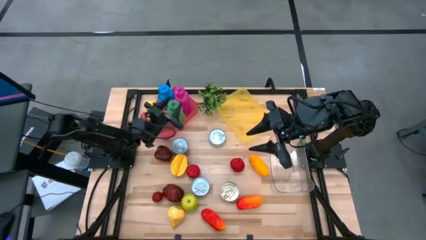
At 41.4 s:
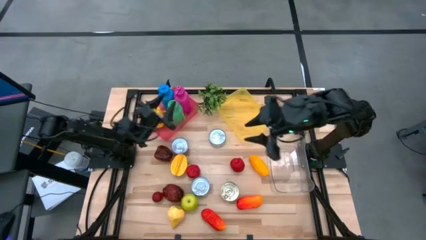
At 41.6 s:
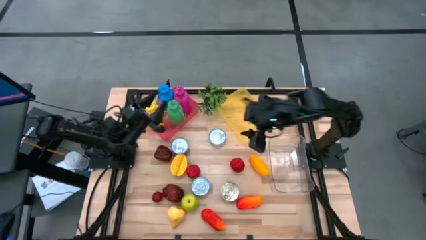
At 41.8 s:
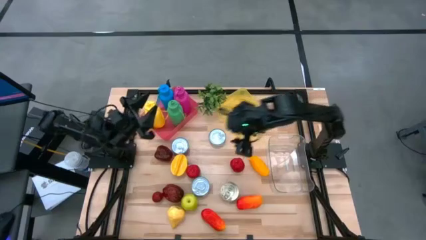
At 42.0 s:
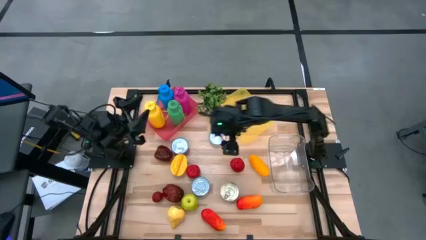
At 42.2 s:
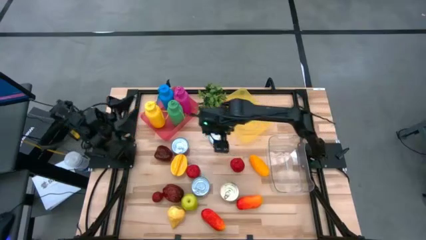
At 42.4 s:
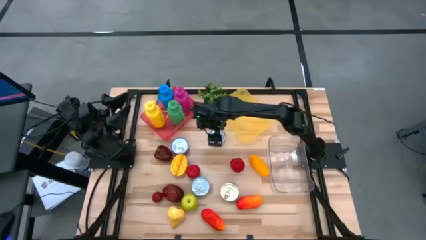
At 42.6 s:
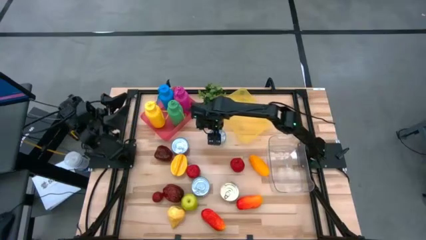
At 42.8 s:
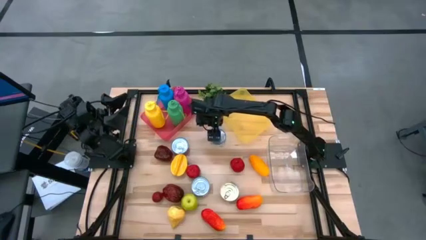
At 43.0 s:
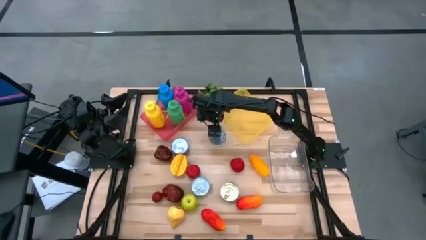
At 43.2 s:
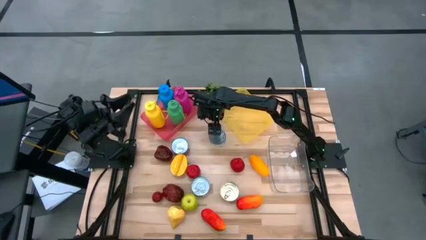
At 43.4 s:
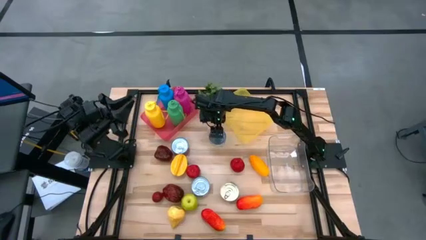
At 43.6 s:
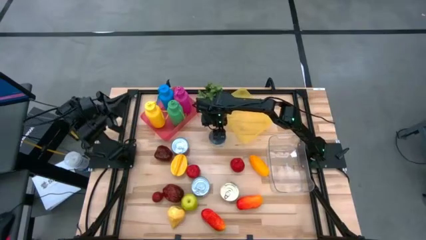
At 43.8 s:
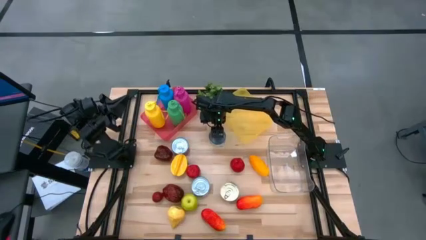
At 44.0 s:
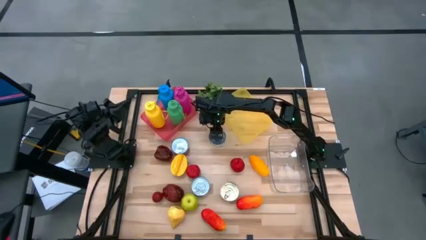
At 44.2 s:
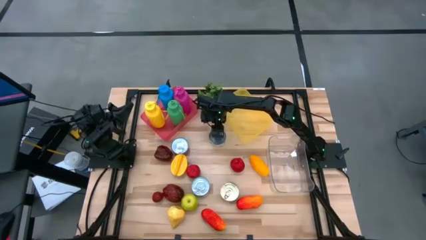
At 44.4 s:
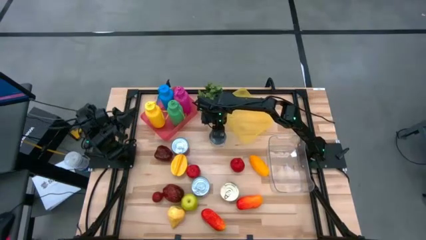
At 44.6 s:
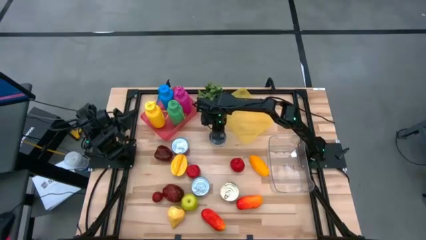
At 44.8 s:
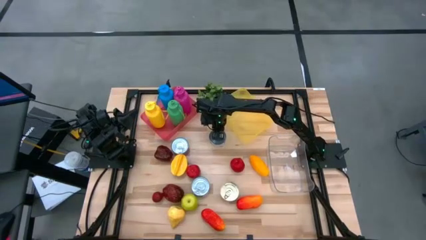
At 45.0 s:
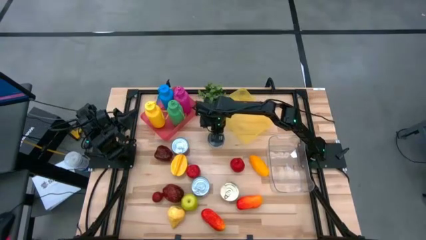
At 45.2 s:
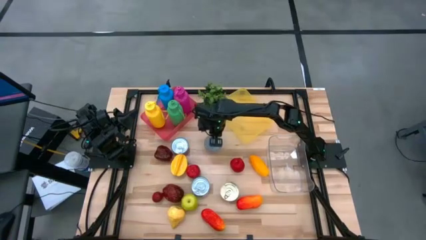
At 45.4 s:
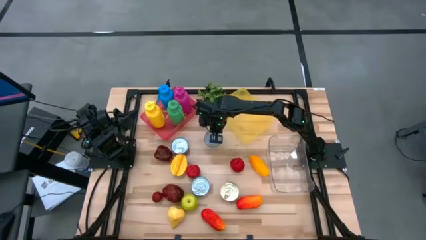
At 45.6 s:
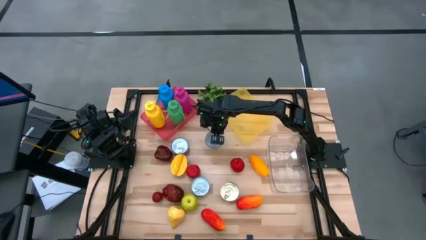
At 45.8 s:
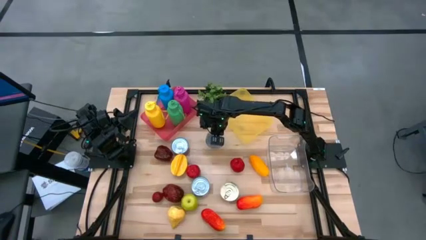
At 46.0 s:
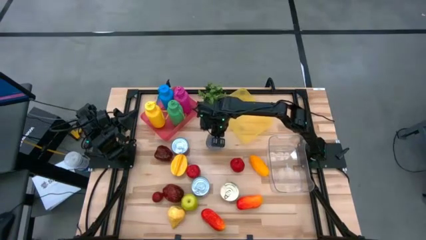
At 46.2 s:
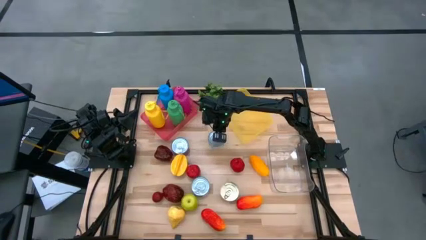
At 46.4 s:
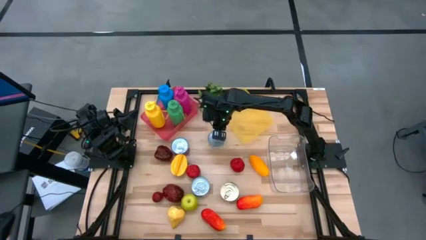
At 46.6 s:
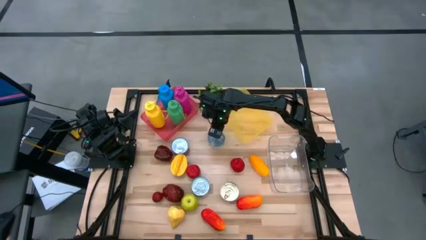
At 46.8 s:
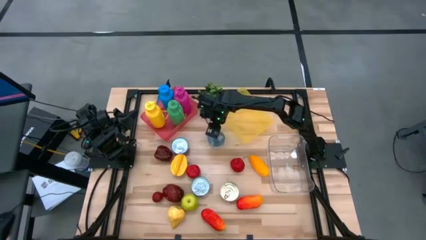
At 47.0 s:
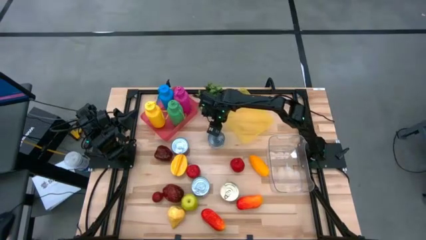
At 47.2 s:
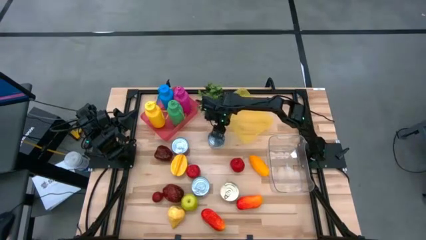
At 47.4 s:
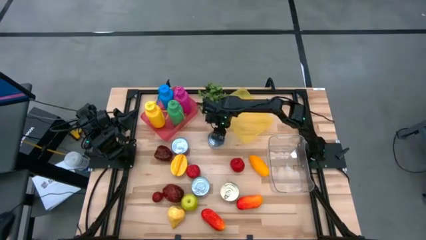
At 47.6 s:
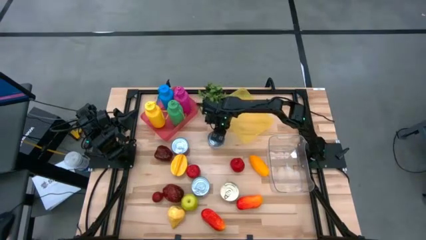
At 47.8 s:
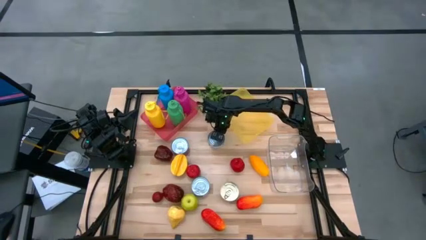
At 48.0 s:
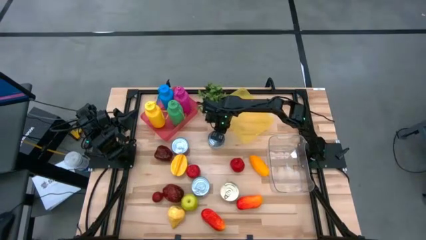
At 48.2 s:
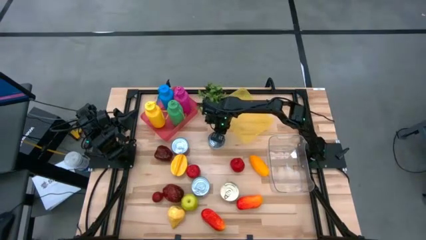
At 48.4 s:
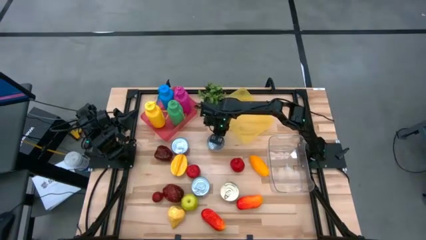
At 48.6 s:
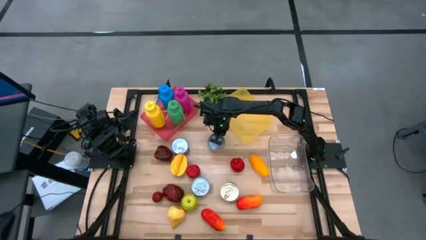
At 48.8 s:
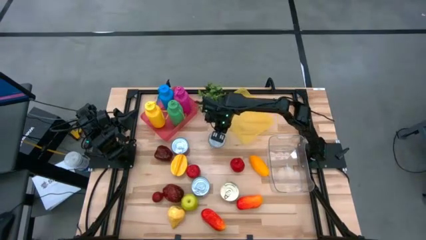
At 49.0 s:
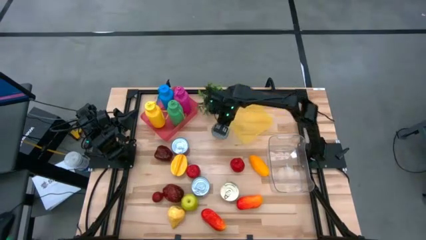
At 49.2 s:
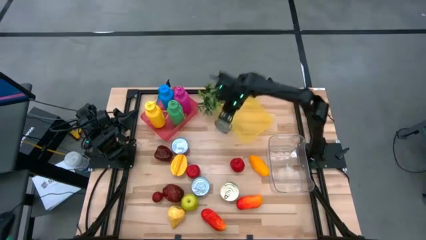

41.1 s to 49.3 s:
Task: Pick & Place Food Item
Put the green tuna can into the yellow bin

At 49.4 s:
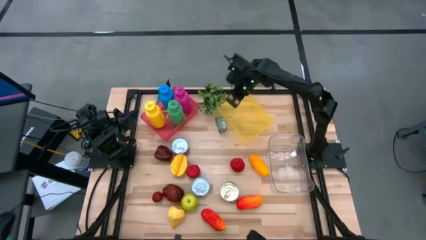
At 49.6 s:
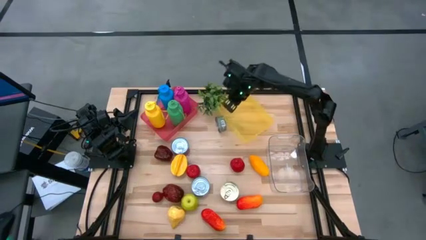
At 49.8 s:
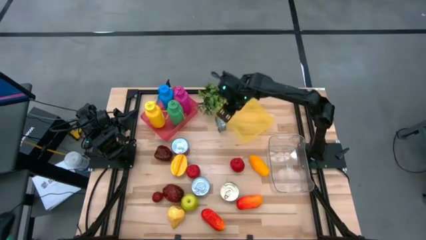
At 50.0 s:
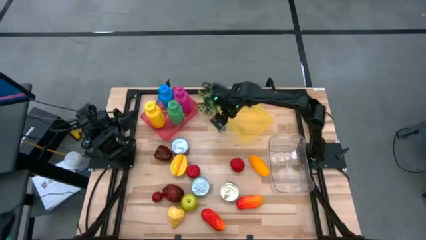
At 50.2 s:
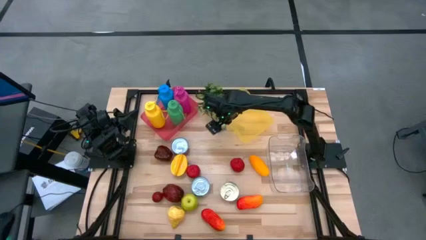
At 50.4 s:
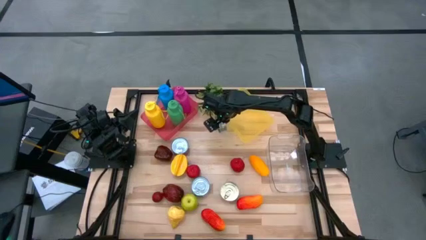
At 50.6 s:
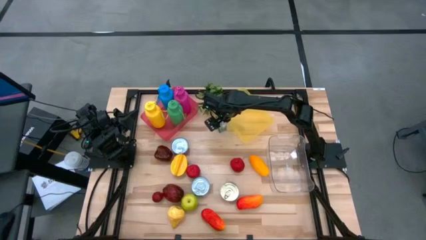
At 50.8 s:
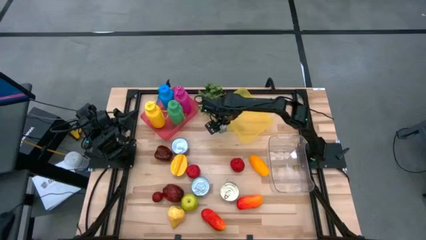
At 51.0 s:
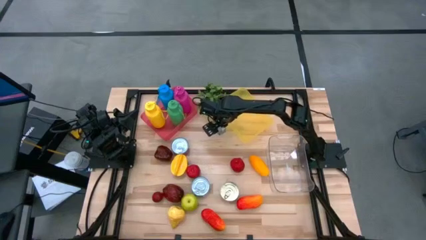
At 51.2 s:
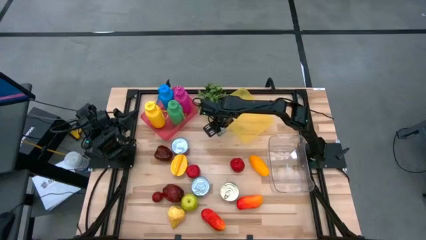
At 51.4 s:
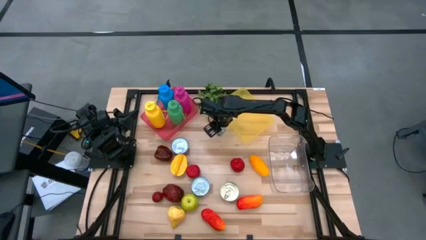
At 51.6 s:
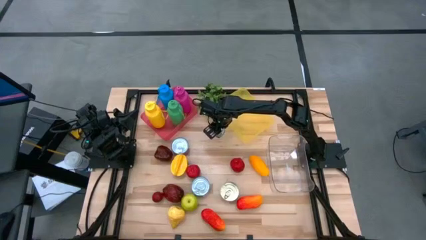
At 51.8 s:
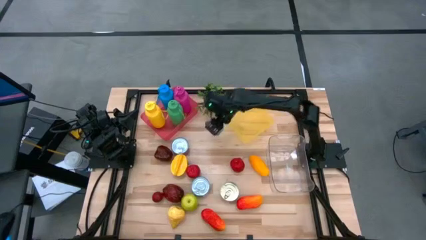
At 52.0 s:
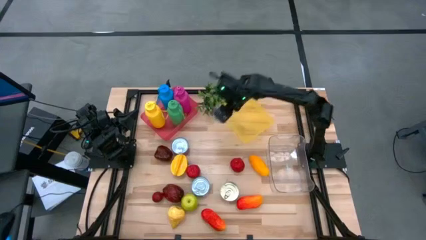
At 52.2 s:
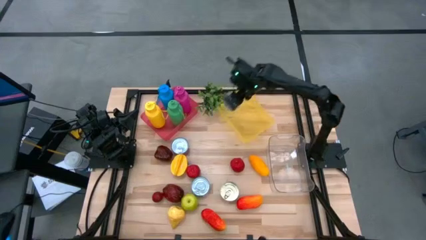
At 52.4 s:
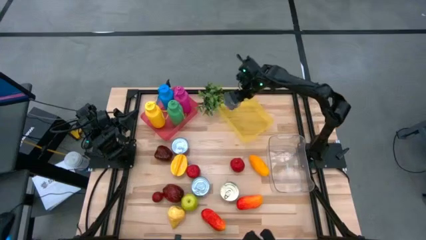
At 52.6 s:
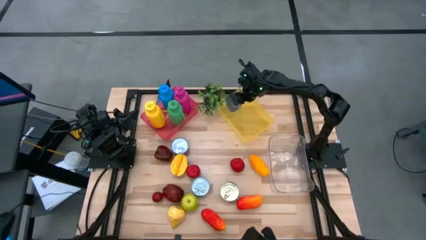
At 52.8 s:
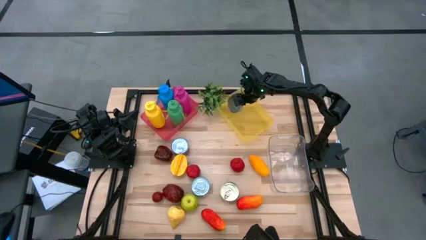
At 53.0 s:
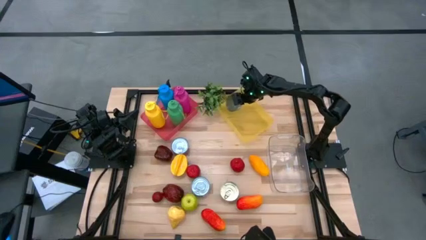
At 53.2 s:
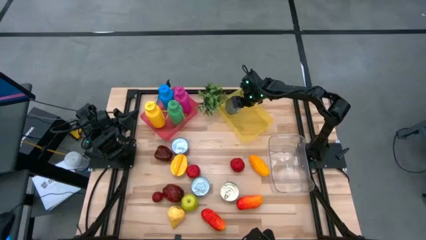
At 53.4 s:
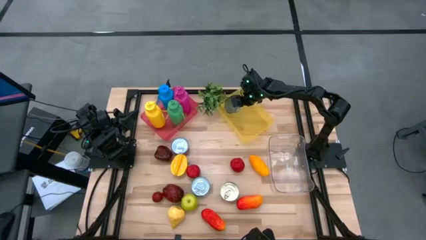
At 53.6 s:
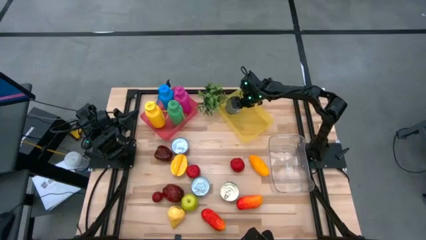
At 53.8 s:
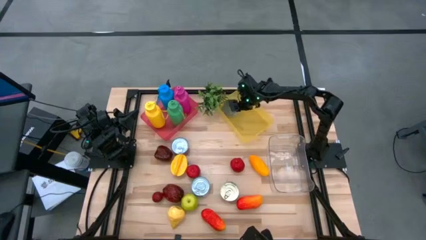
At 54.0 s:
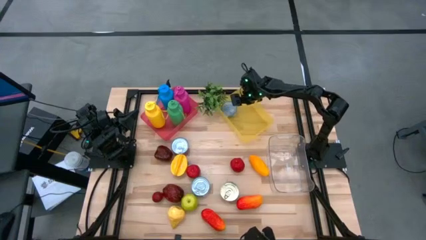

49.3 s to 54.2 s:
Put the green tuna can into the yellow bin

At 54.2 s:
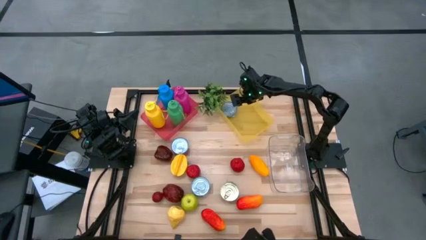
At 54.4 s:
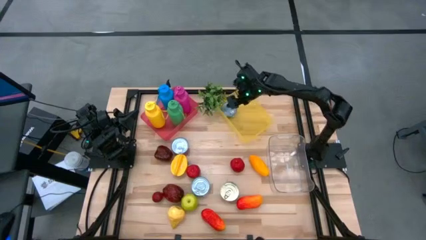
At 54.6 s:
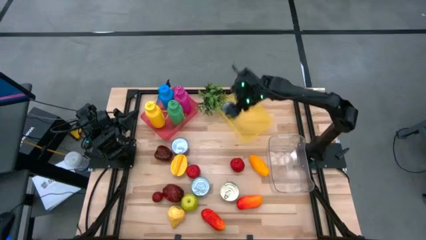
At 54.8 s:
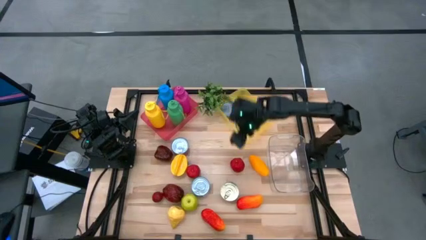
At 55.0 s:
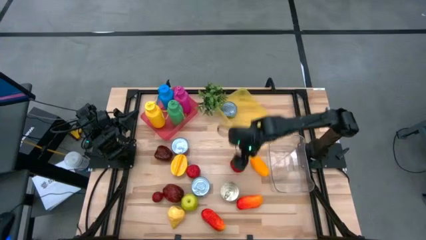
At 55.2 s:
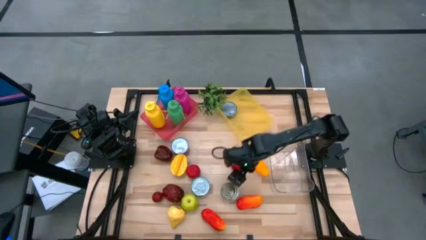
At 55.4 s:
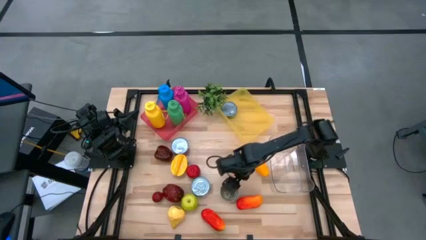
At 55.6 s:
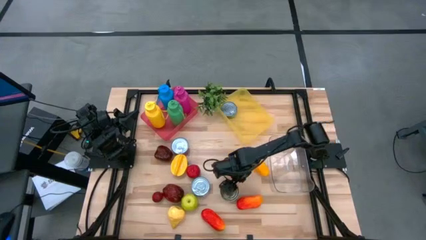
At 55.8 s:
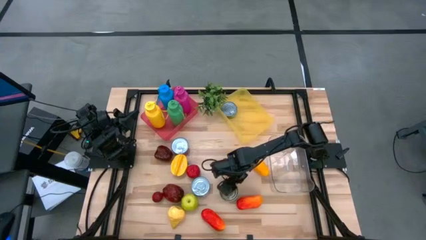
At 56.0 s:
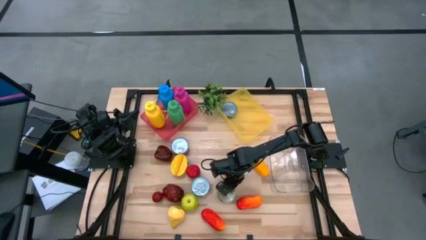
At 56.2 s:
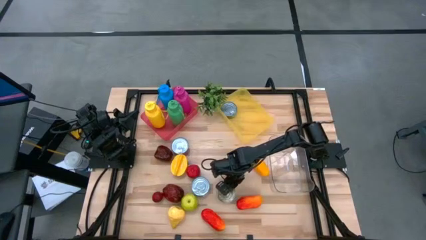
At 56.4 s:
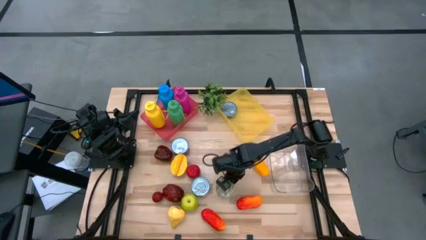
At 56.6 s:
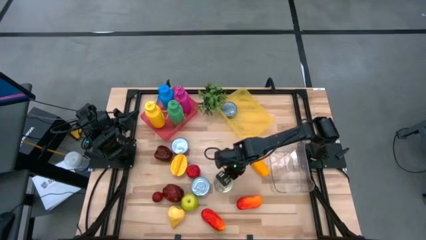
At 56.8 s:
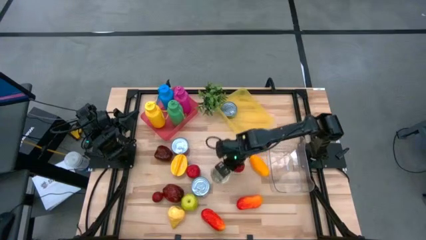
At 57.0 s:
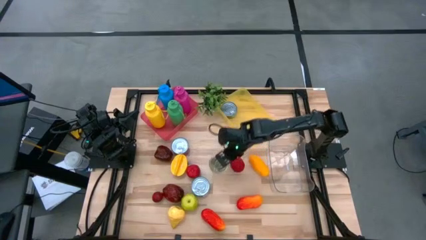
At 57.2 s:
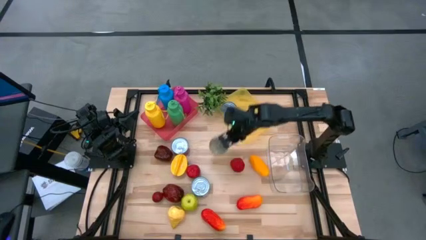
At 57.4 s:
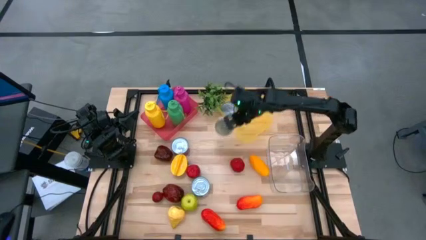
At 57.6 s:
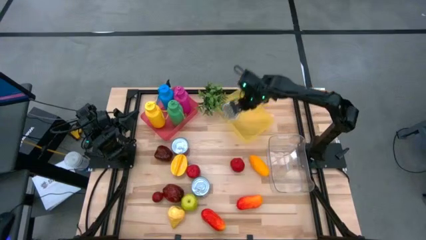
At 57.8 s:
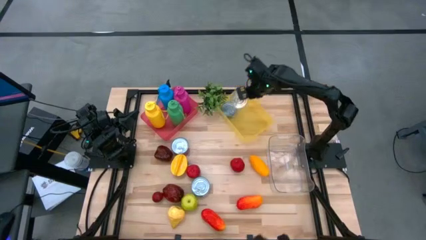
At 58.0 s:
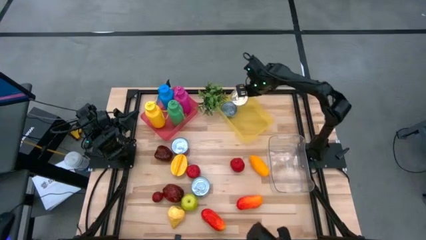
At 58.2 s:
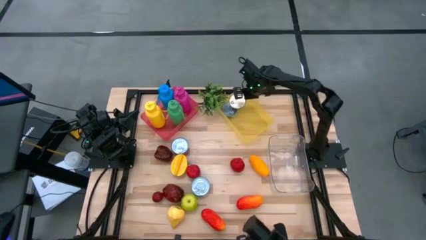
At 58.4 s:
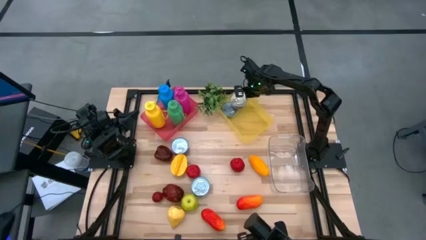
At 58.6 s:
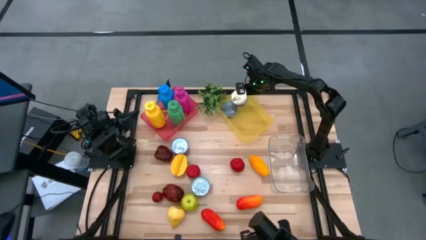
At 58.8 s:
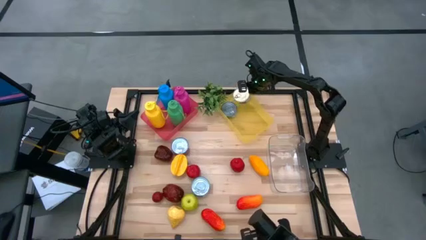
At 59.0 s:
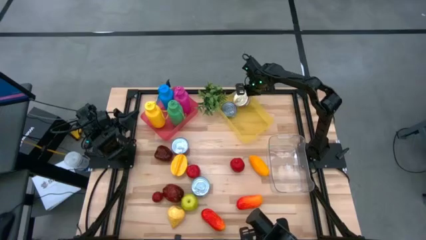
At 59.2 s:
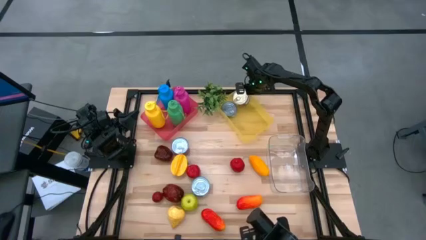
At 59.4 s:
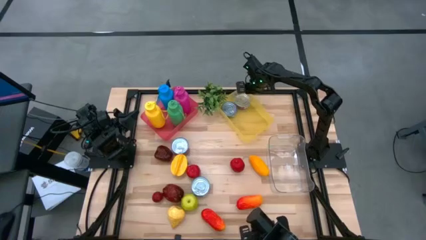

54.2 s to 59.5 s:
Put the blue and pink tuna can into the yellow bin
